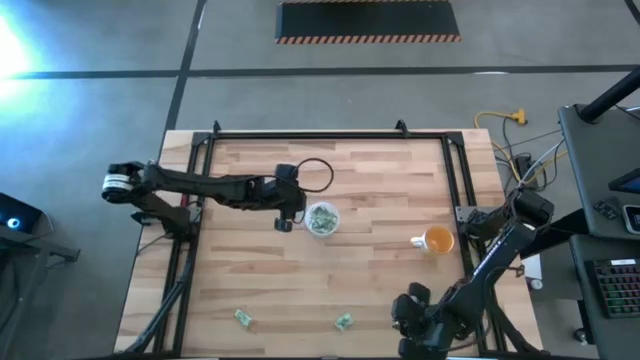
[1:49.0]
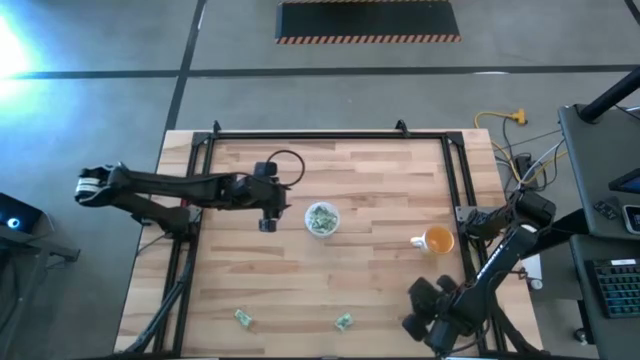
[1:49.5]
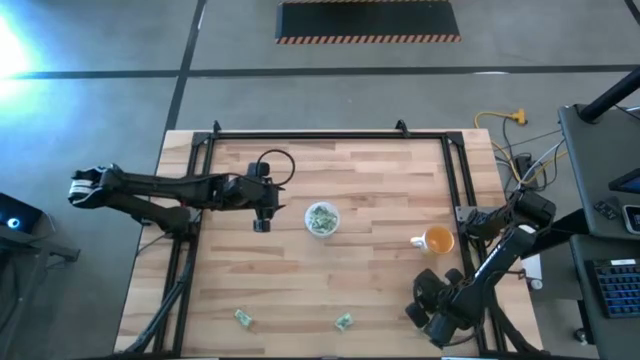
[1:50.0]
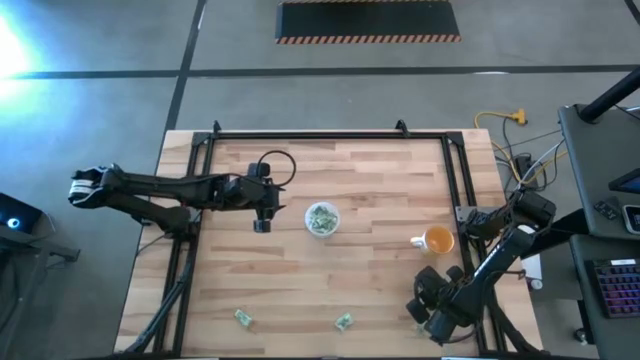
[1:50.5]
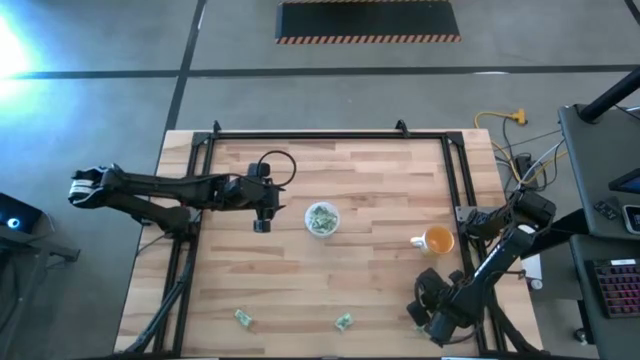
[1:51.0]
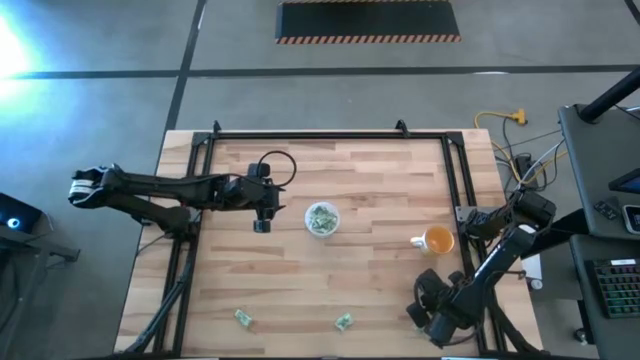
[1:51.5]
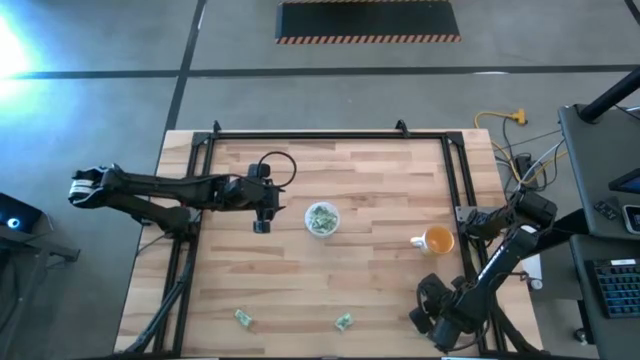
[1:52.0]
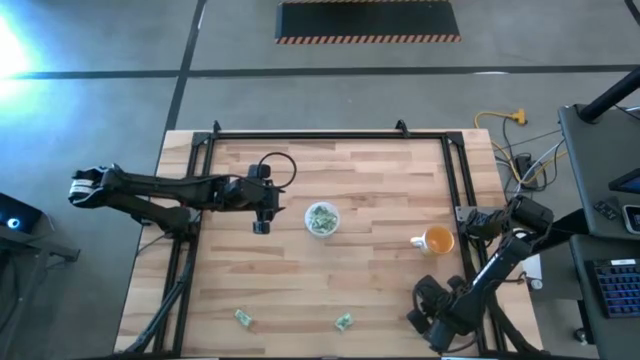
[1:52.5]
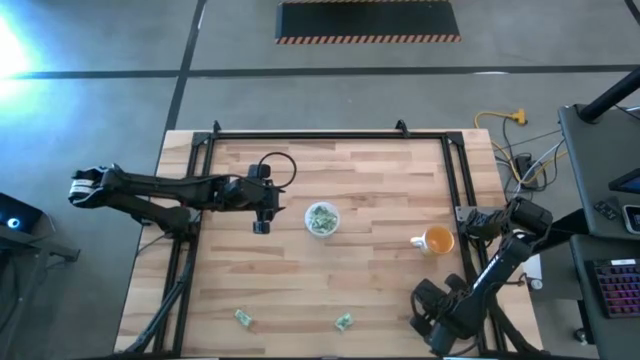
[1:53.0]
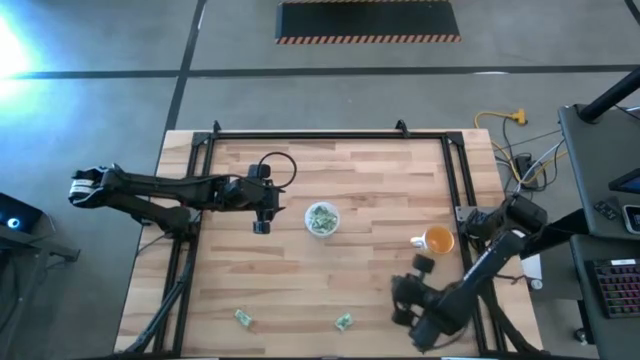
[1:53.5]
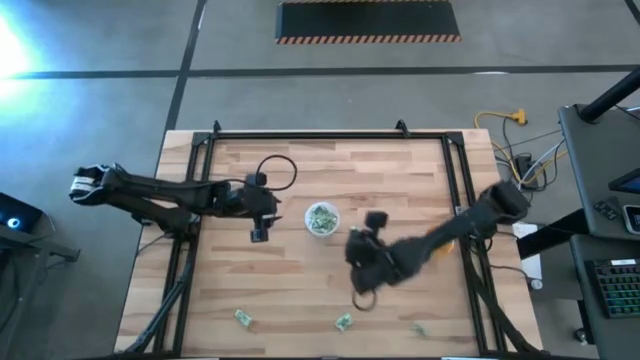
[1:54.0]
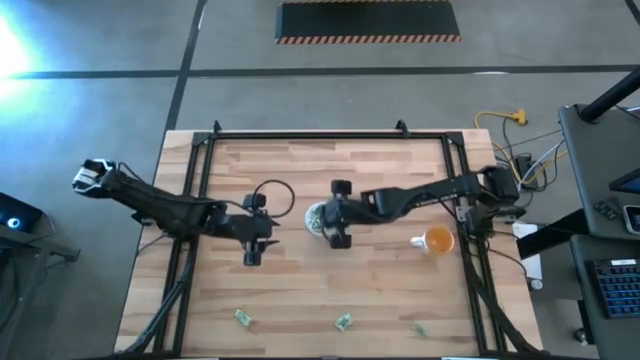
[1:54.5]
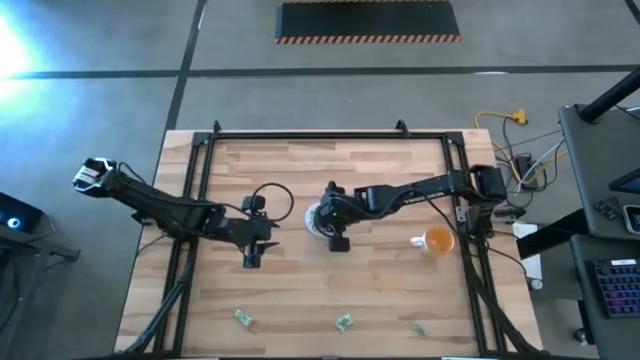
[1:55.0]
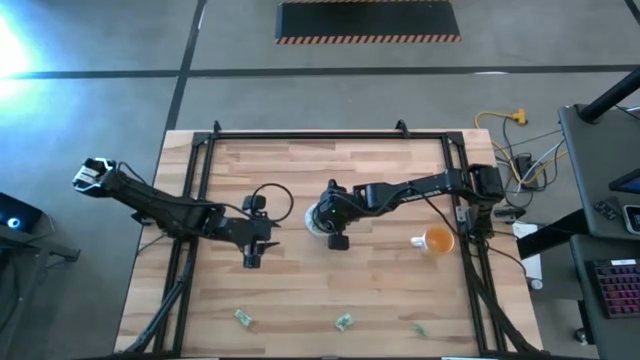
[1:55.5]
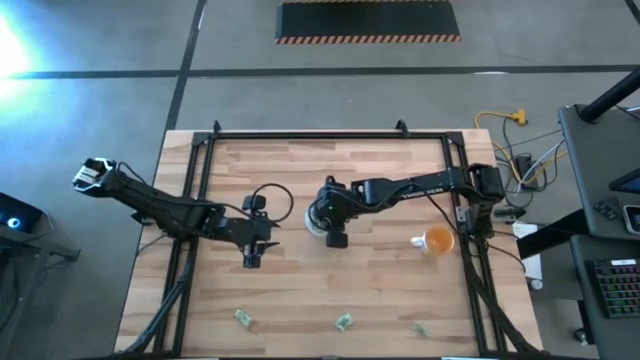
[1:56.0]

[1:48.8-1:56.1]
Task: Pick and place Stevia / Truvia into bins
Put the light green stevia packet into the transparent container

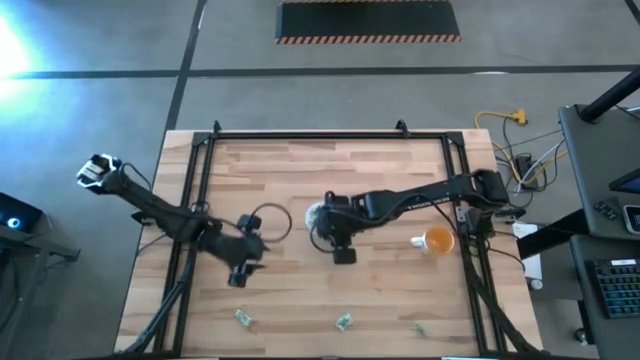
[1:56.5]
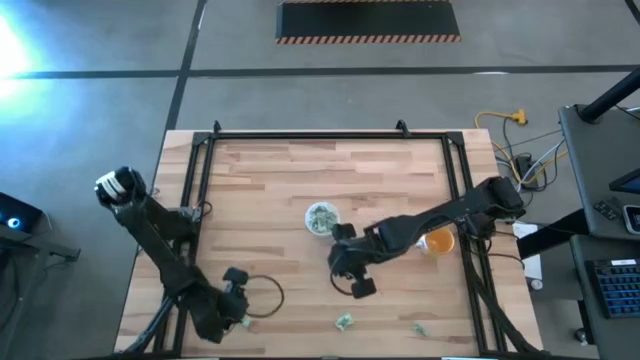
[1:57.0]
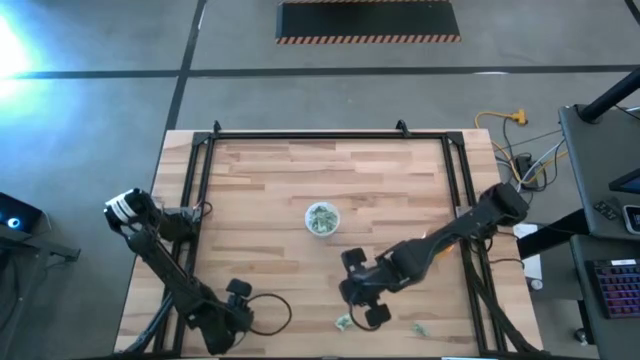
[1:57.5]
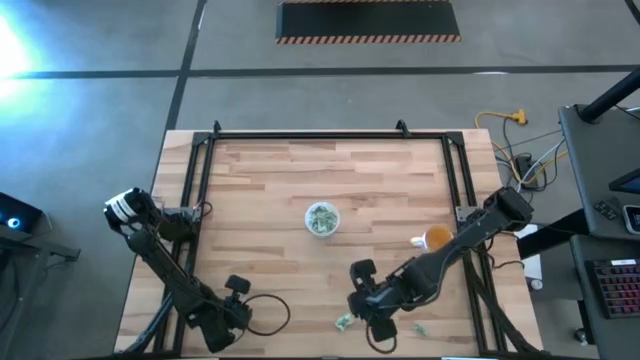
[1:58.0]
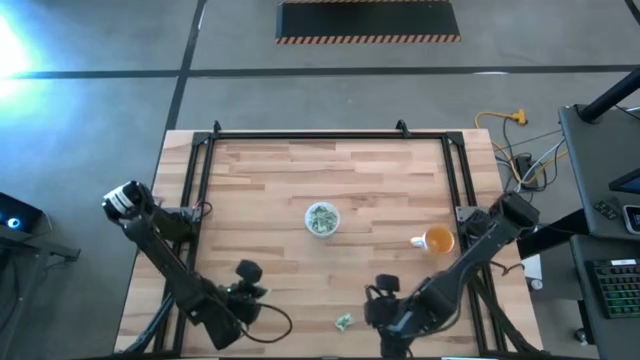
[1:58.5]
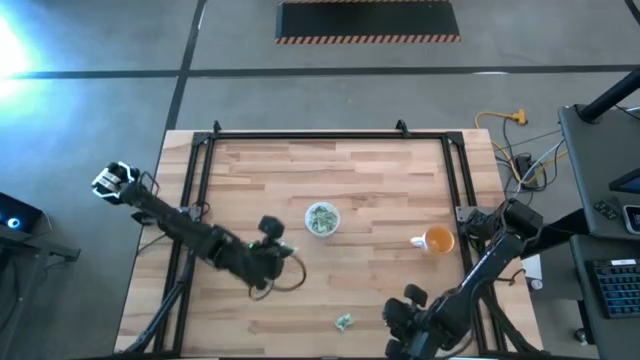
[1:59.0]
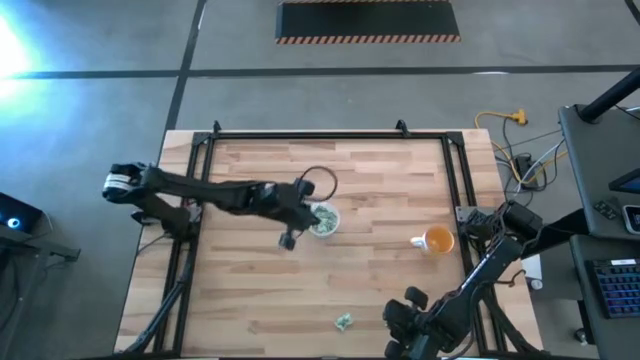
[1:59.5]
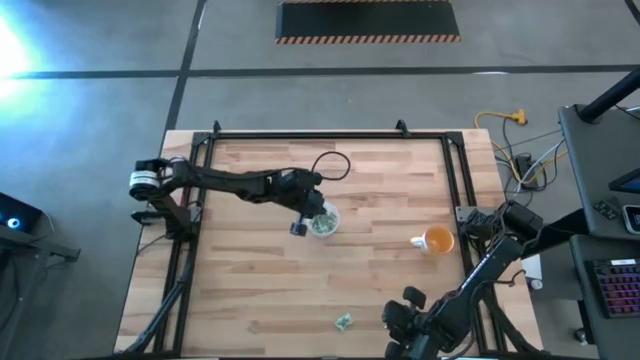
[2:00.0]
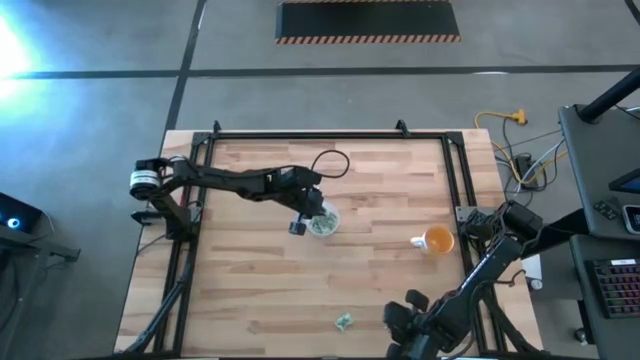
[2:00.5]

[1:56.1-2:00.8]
Put the light green stevia packet into the transparent container

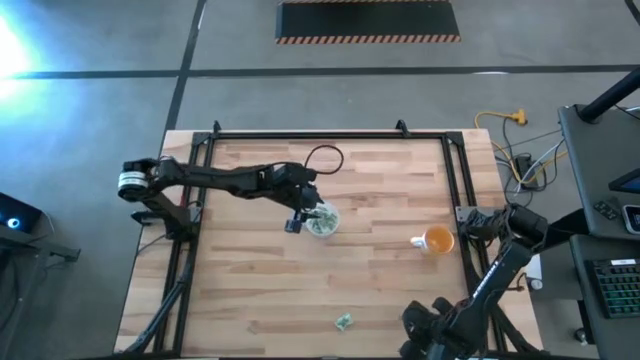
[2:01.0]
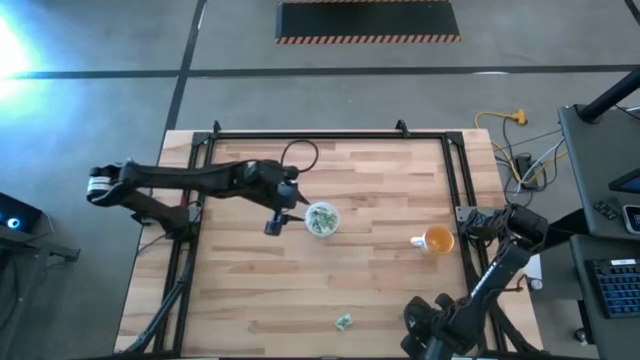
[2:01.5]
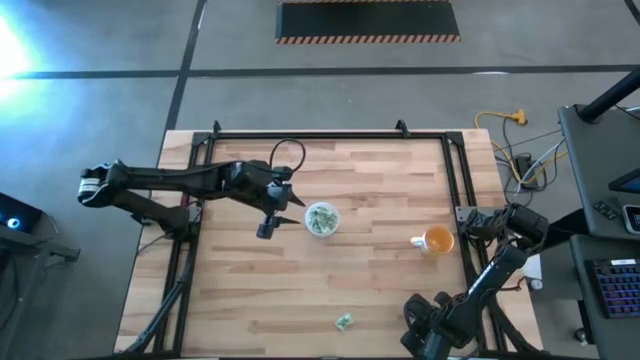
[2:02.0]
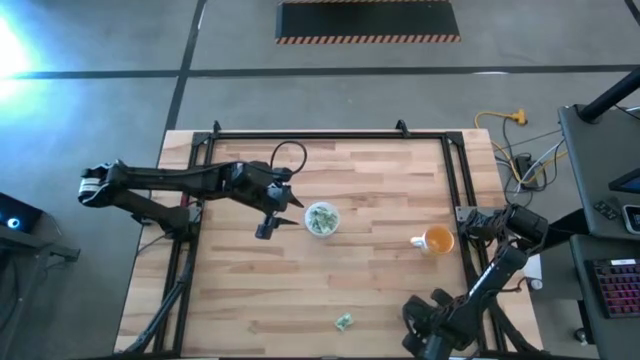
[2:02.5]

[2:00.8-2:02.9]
Put the light green stevia packet into the transparent container

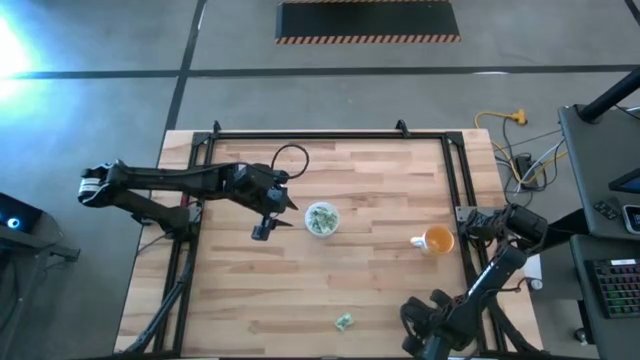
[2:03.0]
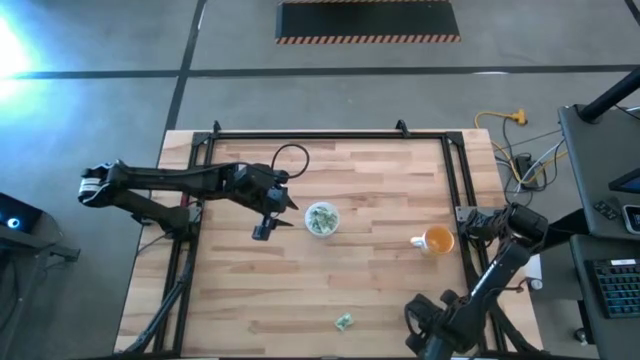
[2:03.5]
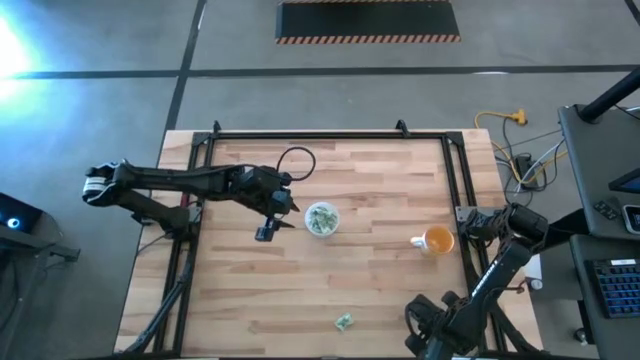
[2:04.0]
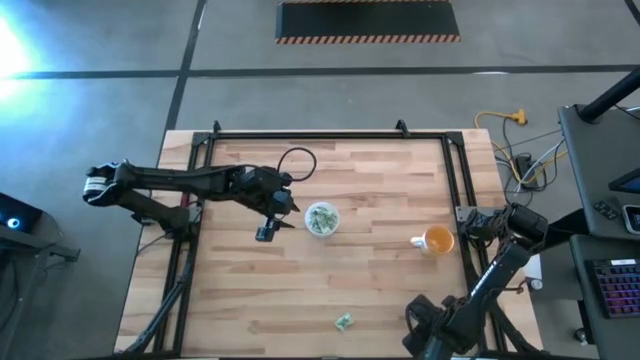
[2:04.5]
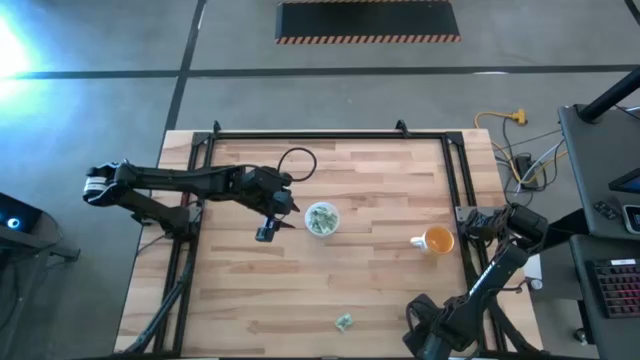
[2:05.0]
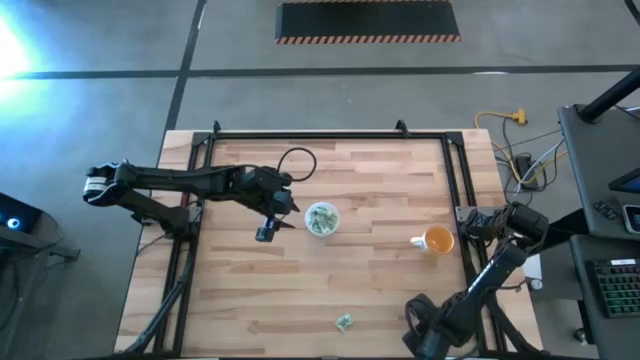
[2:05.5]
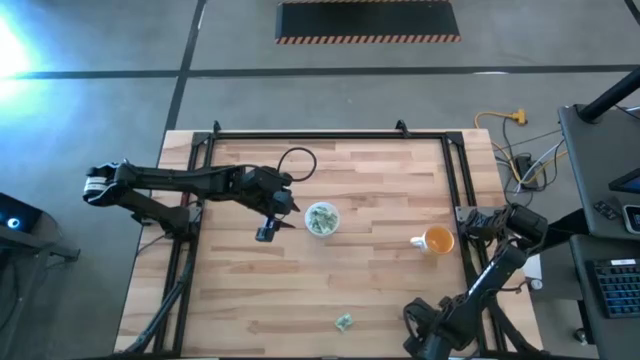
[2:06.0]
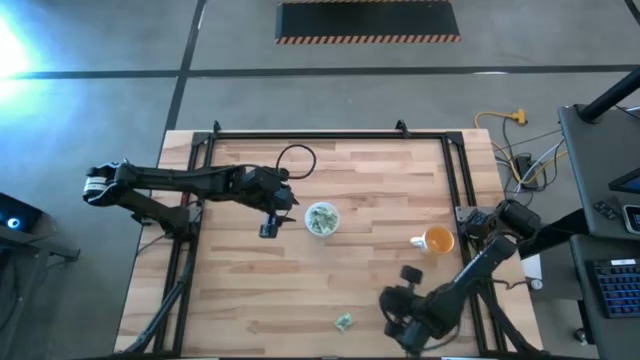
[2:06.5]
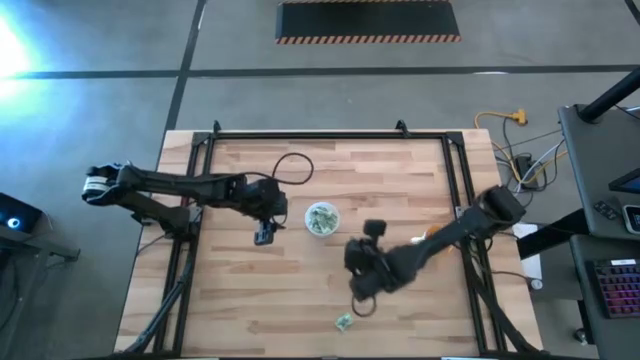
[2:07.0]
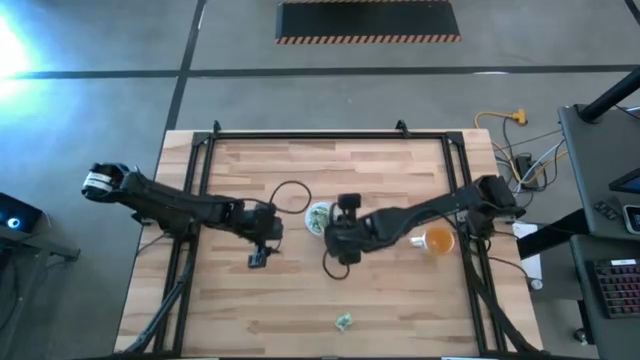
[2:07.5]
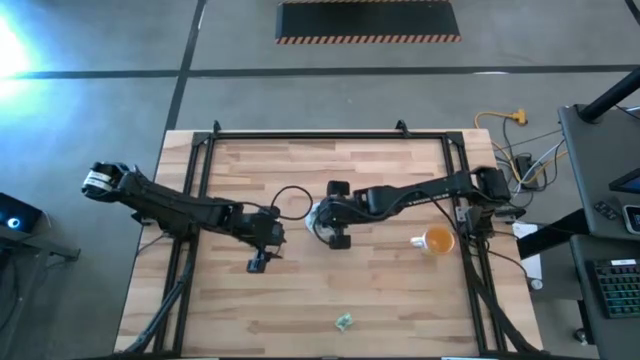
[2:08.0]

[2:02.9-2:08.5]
Put the light green stevia packet into the transparent container
